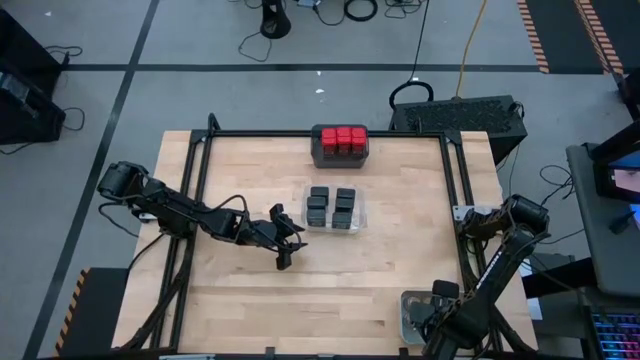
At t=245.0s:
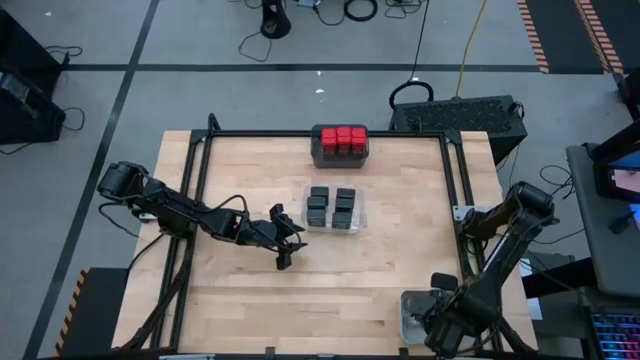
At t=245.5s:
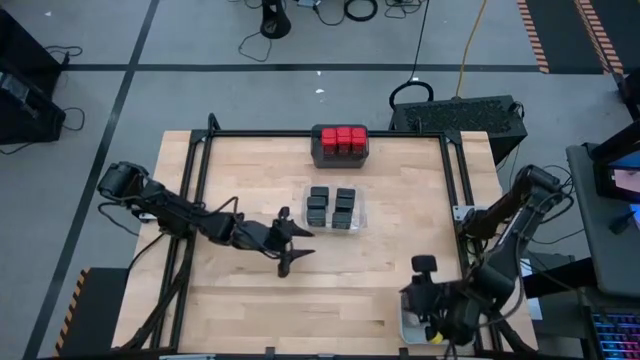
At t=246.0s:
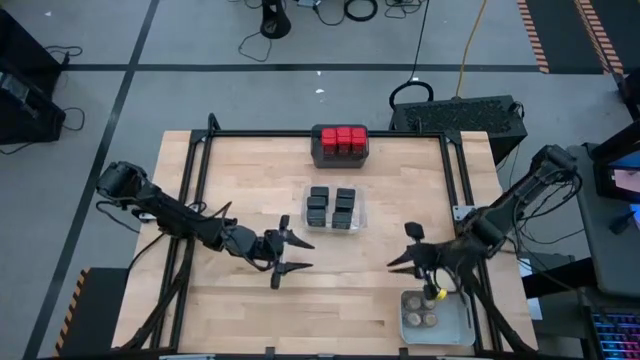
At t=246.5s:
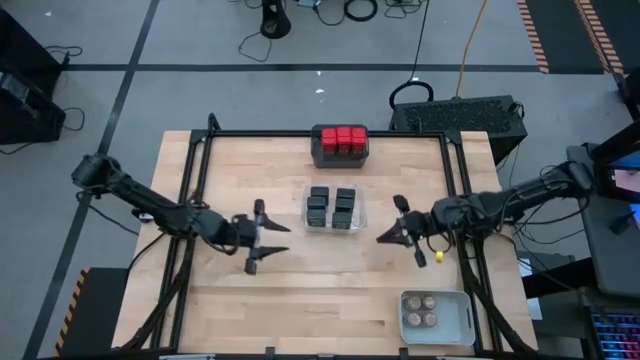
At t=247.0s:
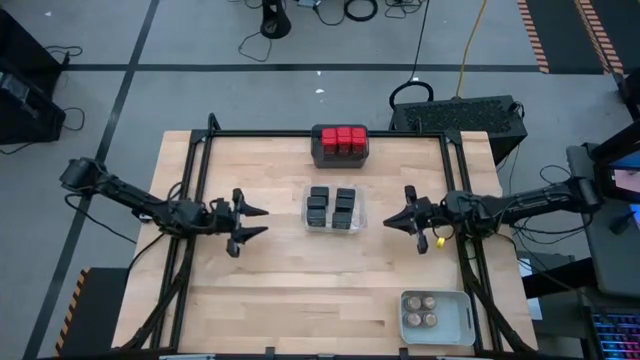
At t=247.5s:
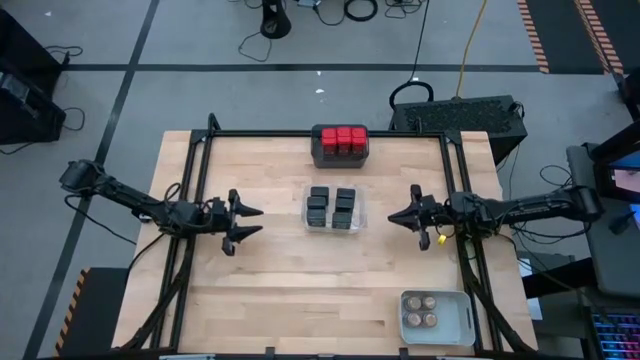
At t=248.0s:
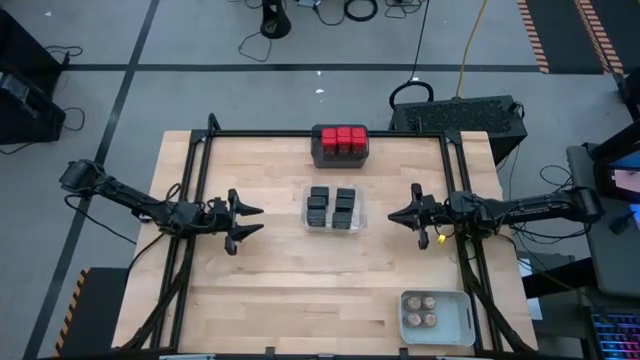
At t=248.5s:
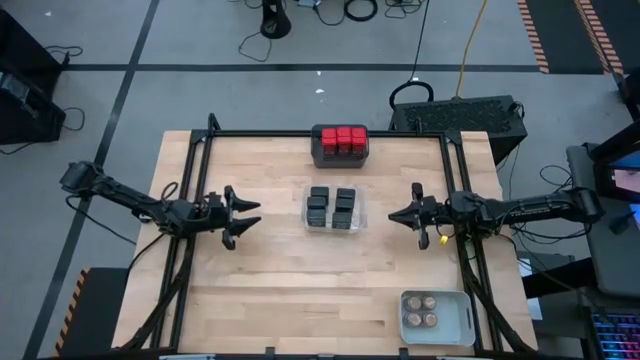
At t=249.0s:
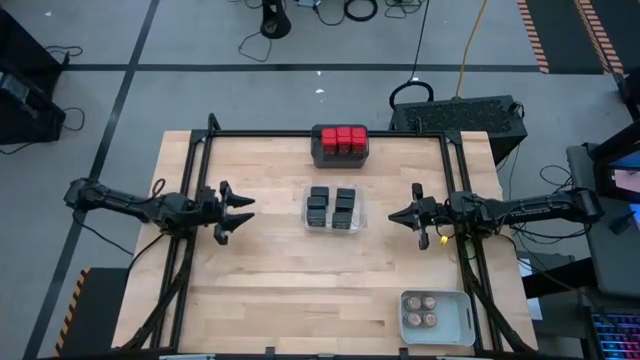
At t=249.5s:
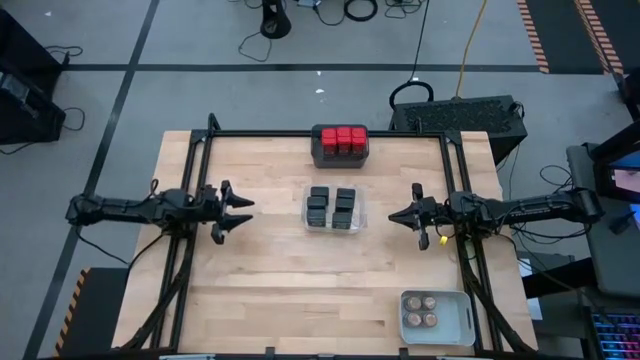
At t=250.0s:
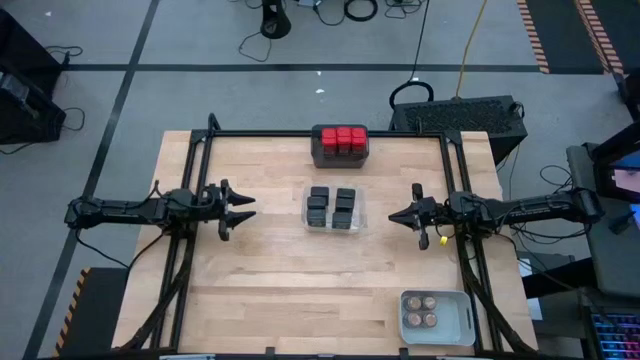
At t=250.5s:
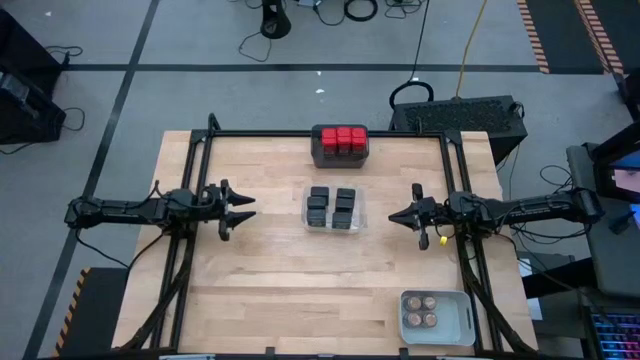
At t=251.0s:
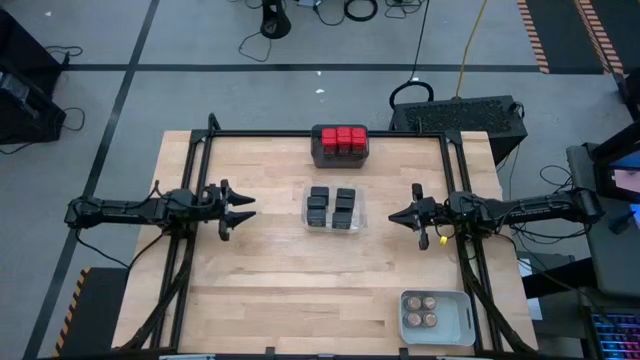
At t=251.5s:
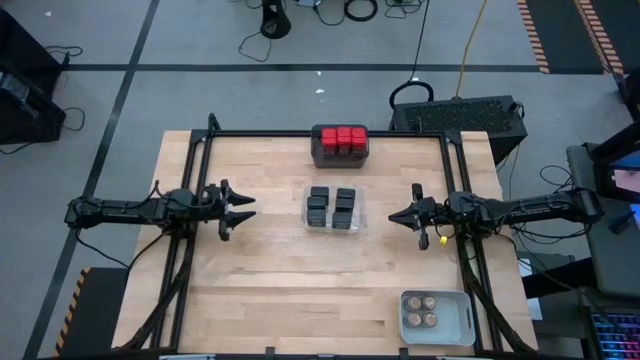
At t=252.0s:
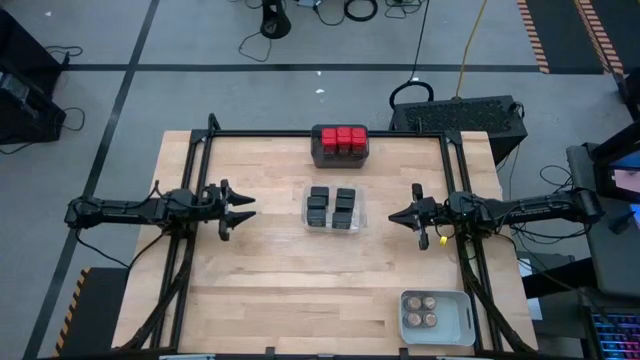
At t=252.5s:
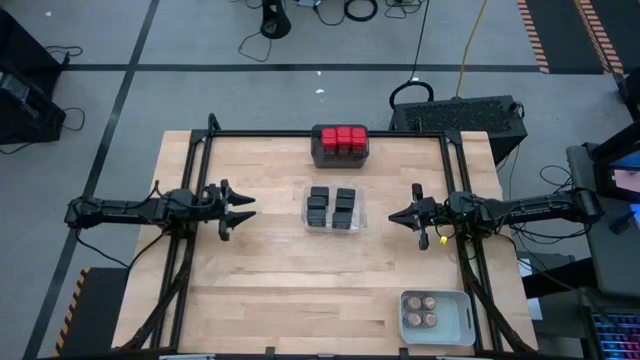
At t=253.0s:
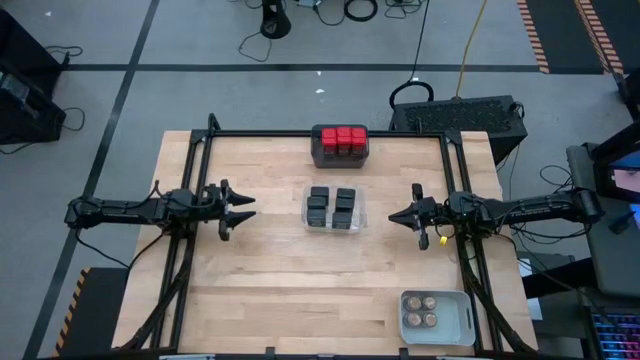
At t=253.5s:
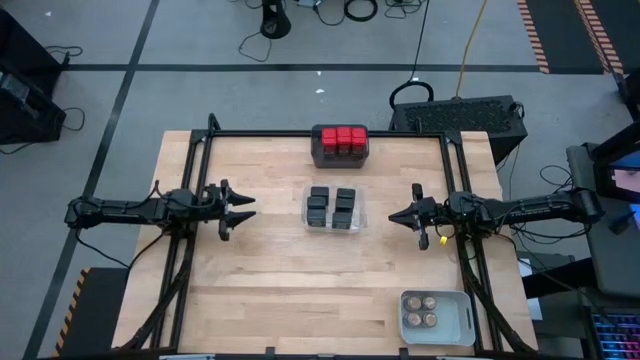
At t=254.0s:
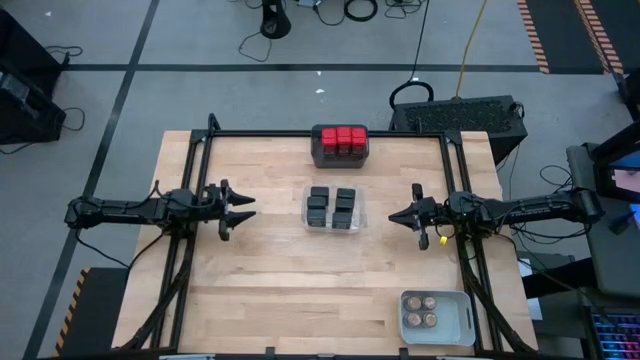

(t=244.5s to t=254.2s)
Task: Sort spices by type
Return to Home Position

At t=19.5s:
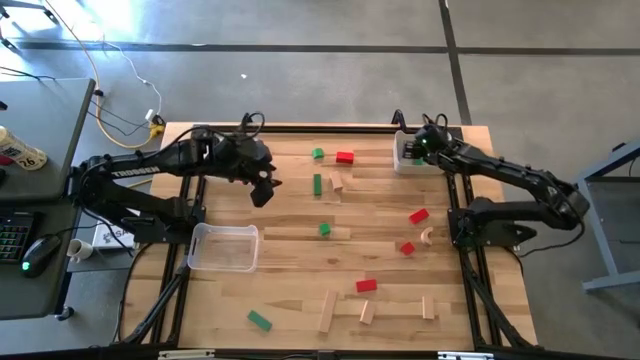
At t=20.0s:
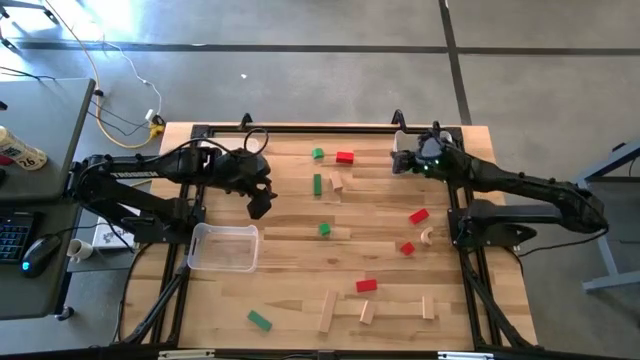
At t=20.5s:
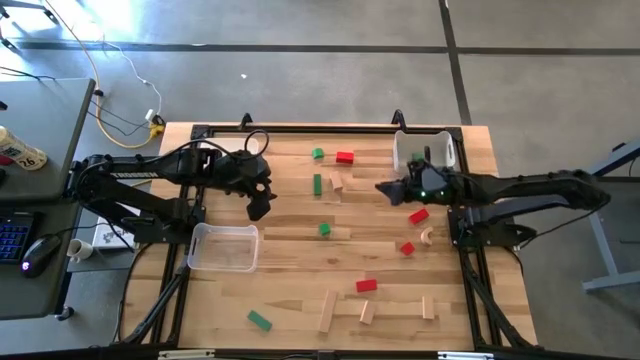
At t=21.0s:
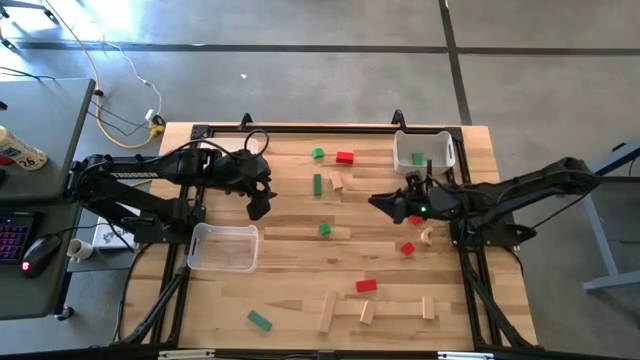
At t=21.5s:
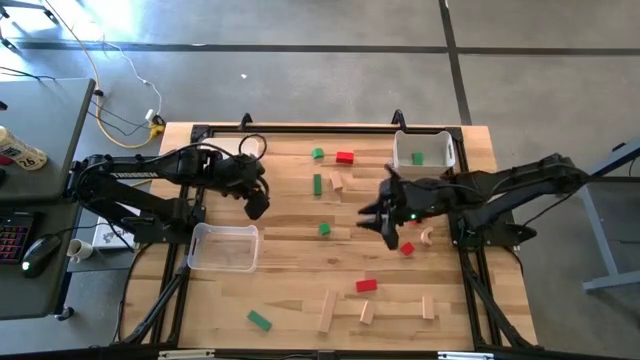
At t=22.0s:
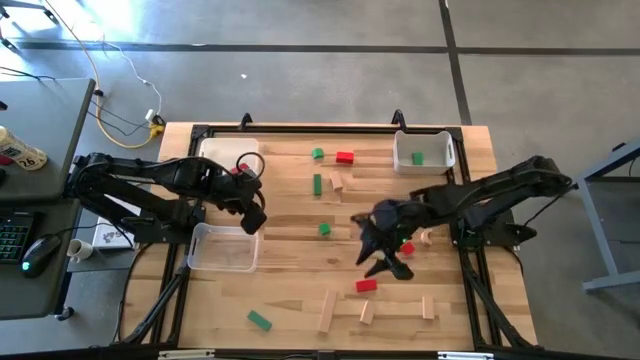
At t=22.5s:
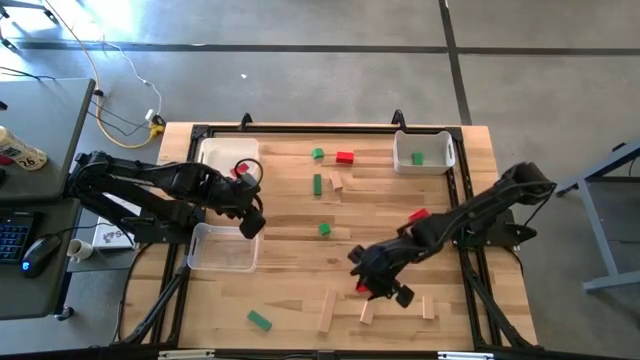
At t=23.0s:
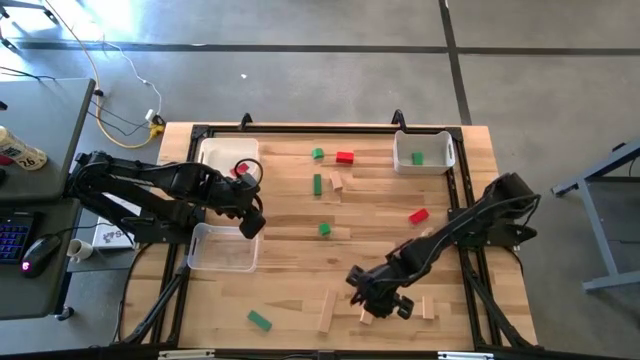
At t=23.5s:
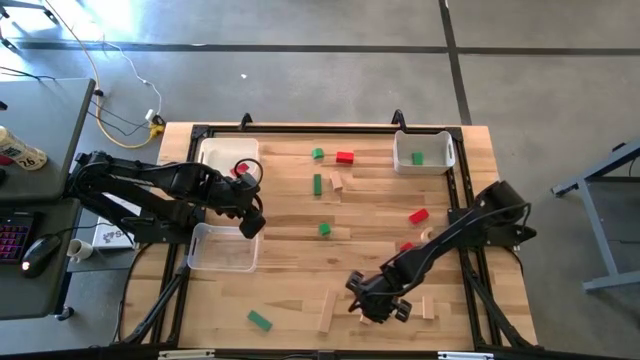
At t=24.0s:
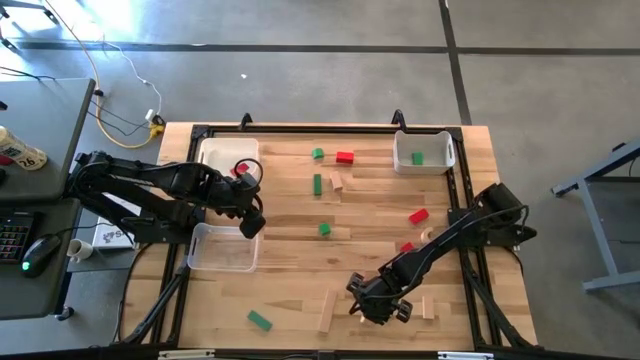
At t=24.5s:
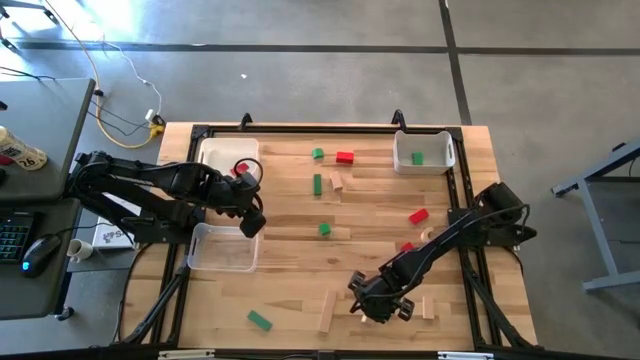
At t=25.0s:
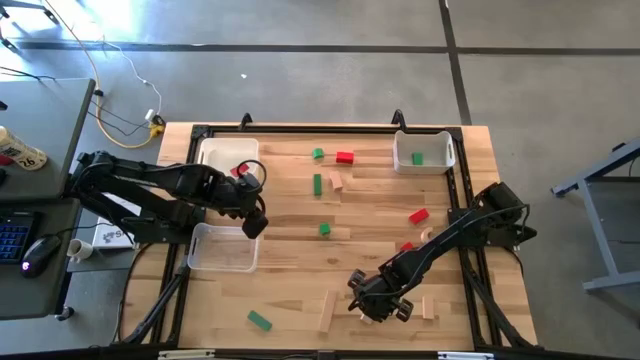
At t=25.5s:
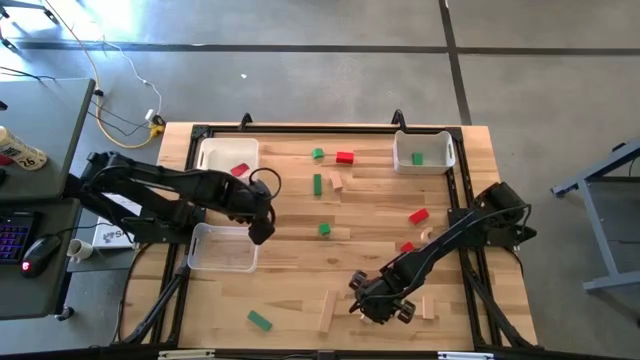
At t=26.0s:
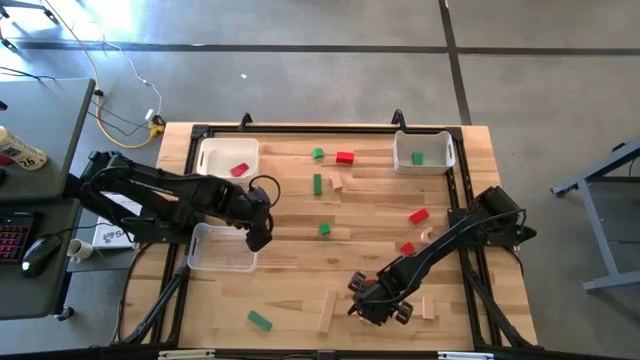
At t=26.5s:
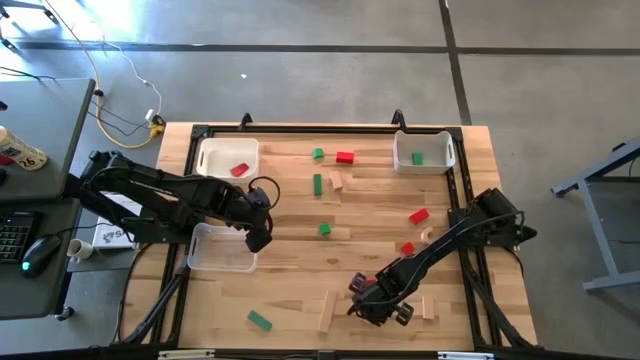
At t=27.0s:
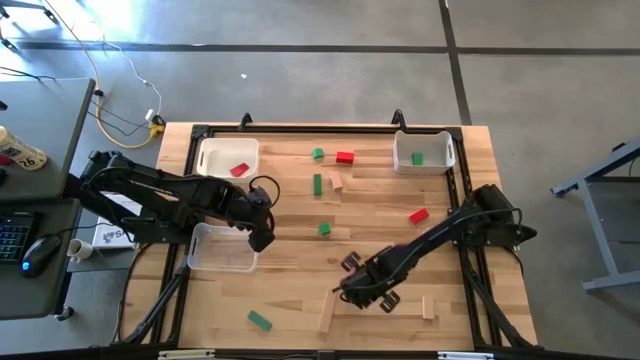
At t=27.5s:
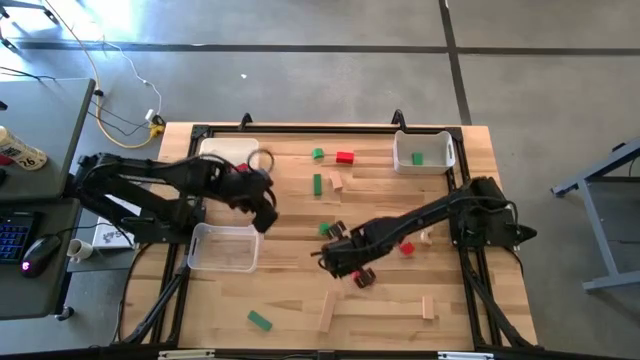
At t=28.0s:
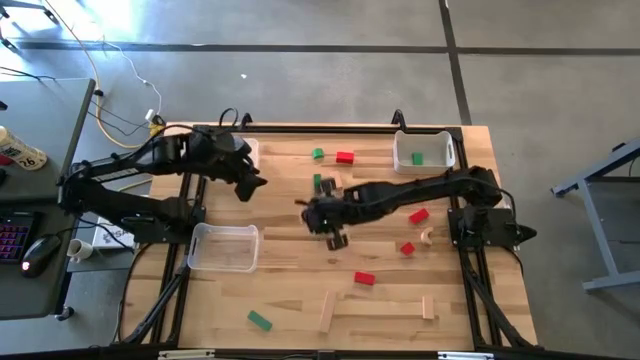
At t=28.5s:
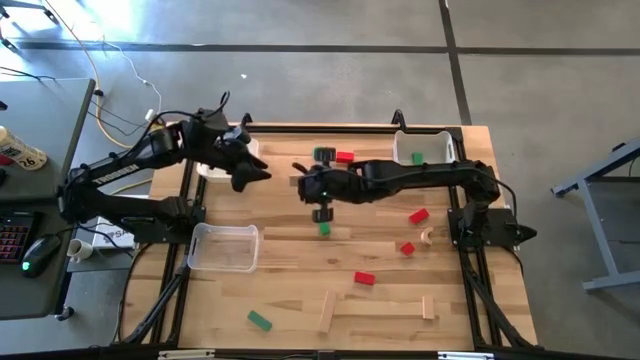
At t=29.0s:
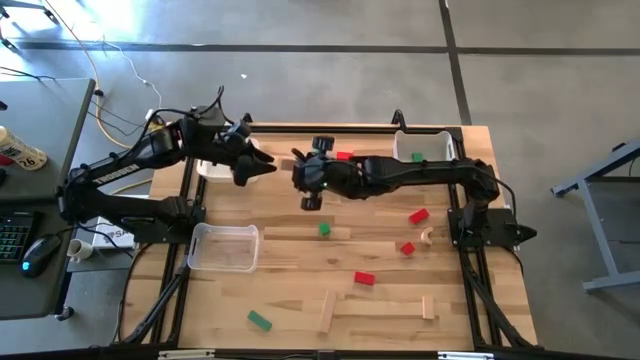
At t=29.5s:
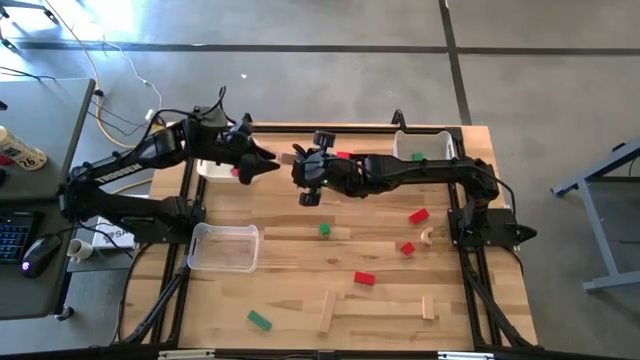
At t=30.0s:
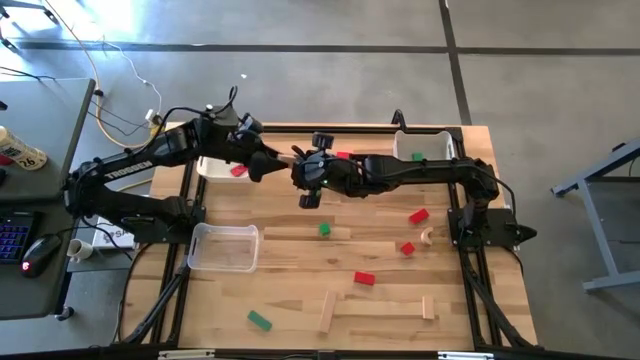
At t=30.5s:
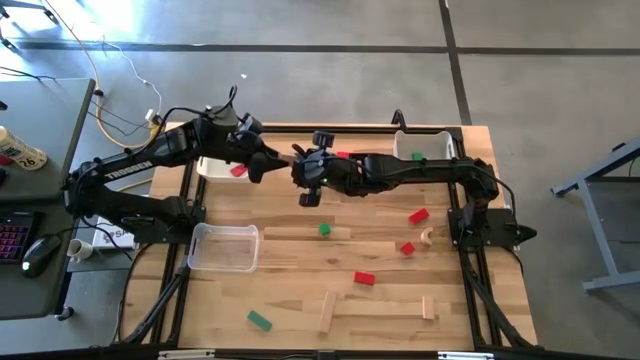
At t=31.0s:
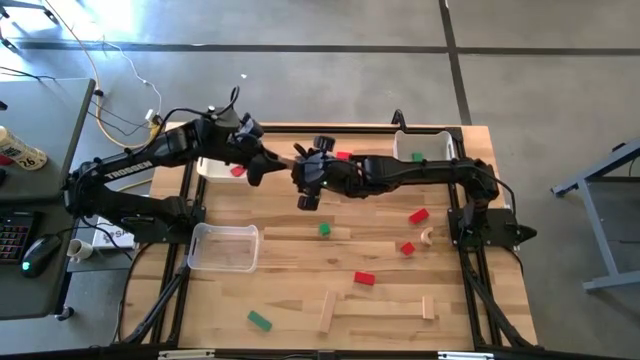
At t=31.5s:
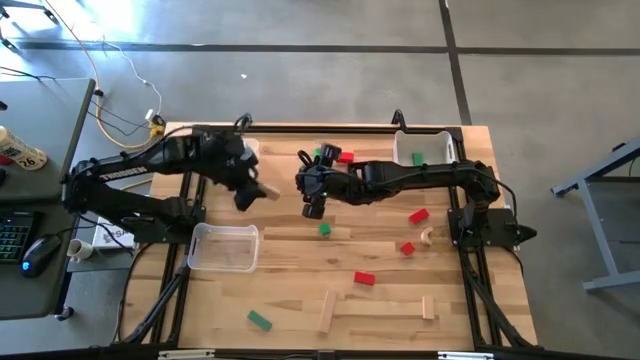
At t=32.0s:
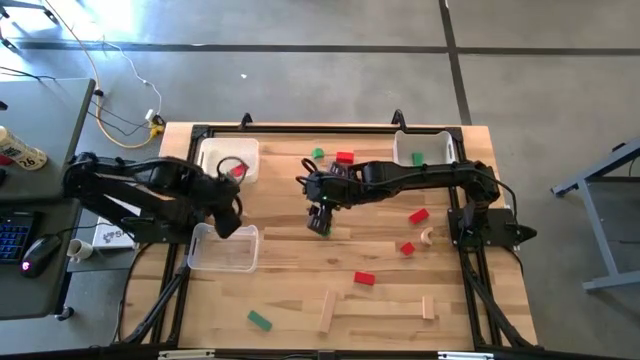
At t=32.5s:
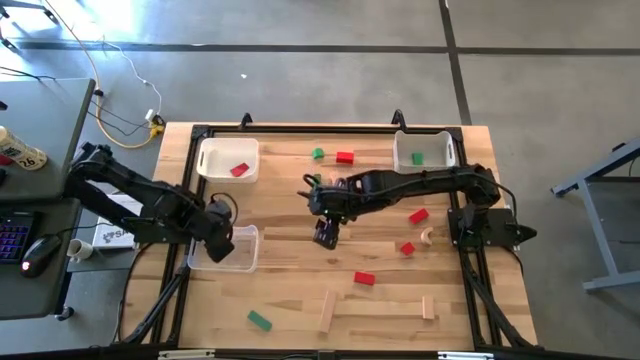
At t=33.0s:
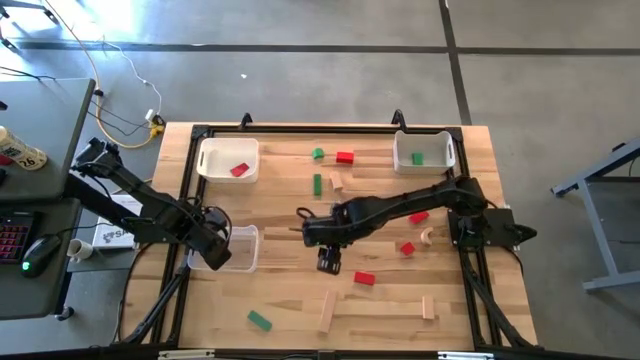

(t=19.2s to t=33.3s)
Task: Sort & place blocks by color
Put the cream rectangle into the transparent bin
